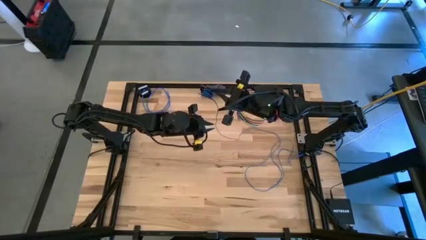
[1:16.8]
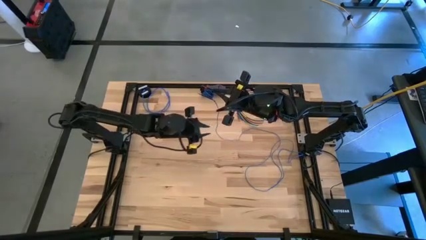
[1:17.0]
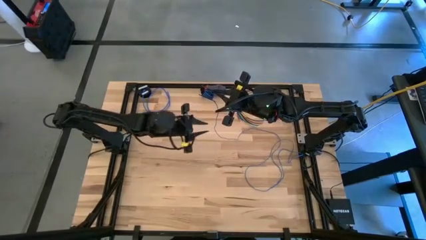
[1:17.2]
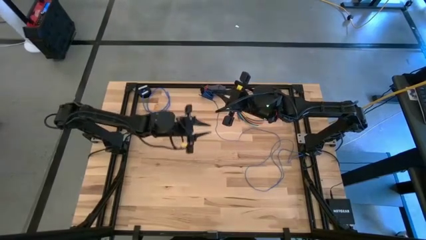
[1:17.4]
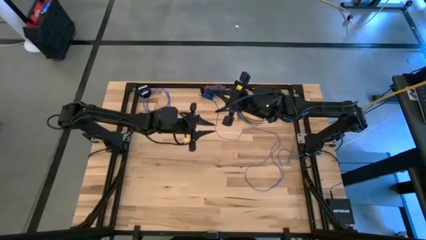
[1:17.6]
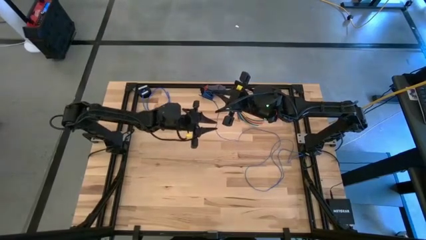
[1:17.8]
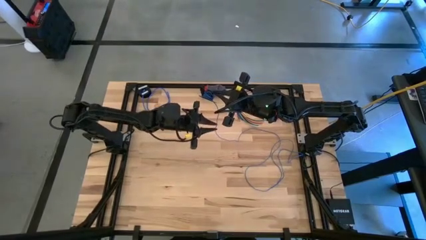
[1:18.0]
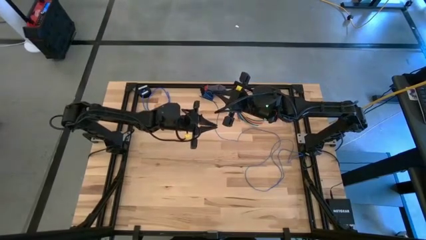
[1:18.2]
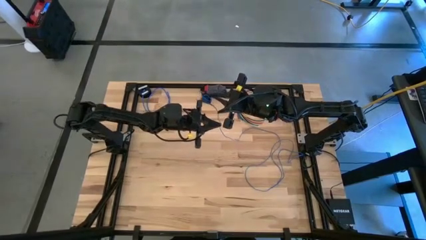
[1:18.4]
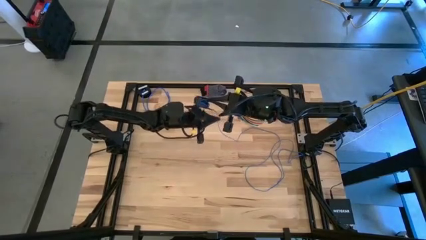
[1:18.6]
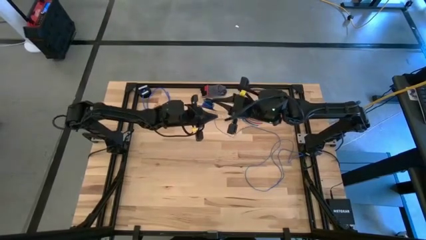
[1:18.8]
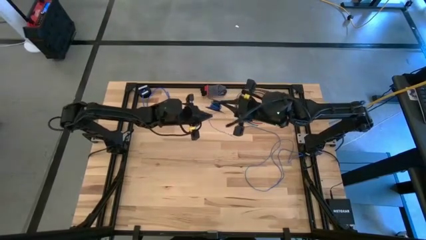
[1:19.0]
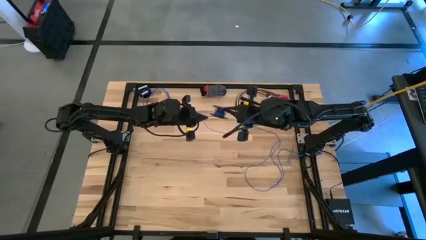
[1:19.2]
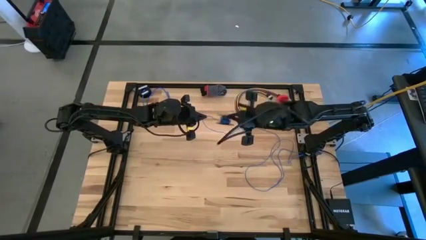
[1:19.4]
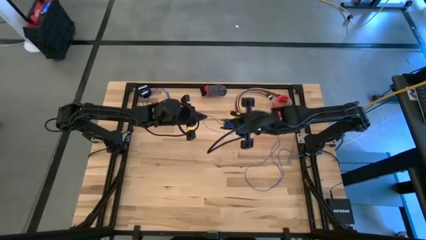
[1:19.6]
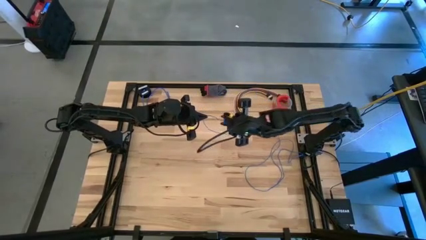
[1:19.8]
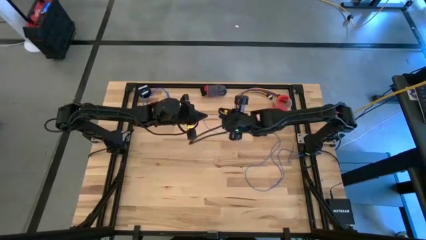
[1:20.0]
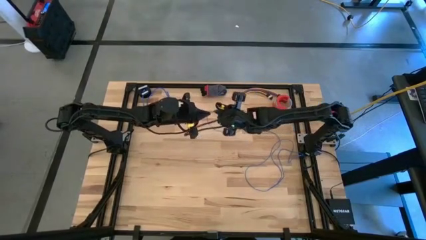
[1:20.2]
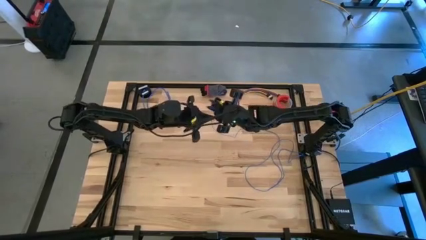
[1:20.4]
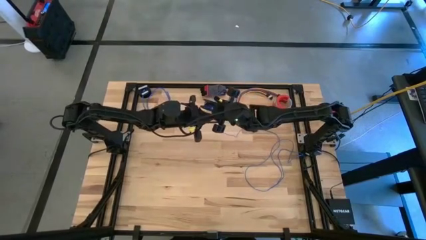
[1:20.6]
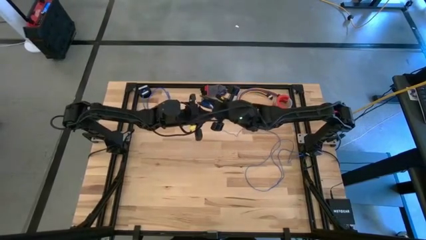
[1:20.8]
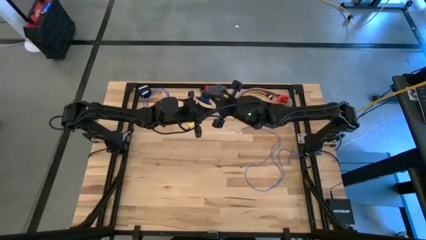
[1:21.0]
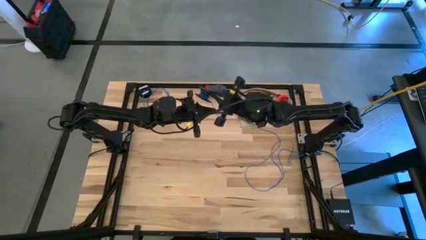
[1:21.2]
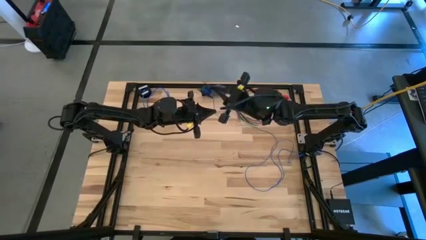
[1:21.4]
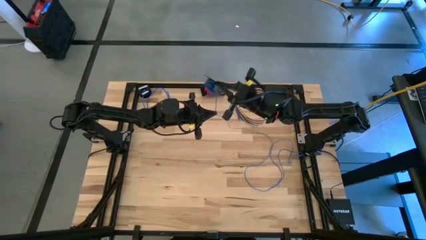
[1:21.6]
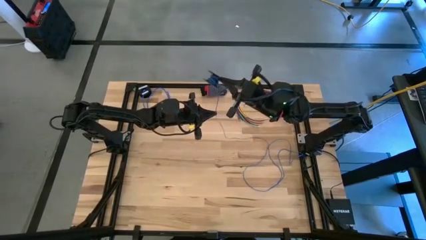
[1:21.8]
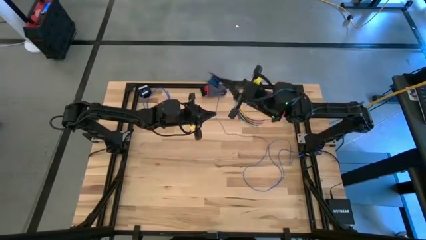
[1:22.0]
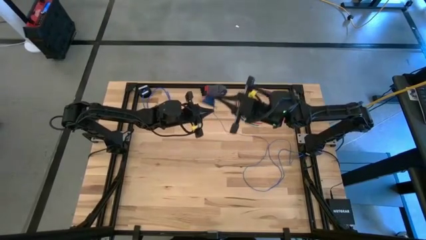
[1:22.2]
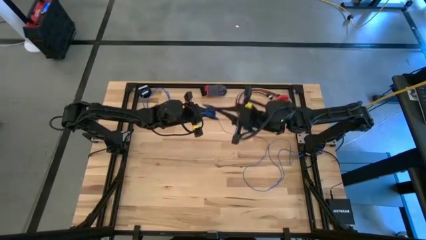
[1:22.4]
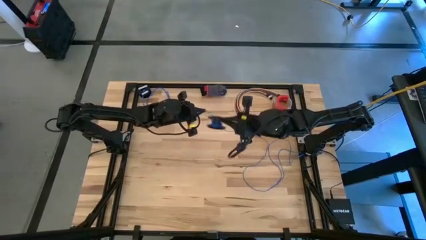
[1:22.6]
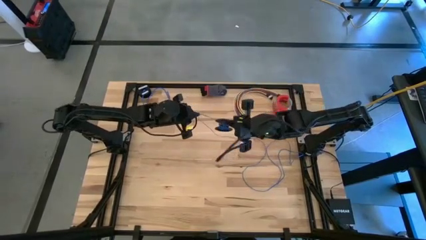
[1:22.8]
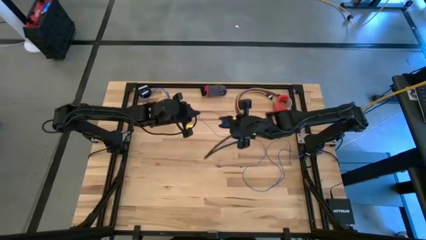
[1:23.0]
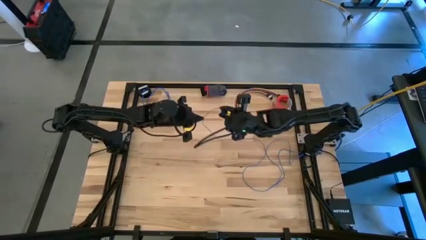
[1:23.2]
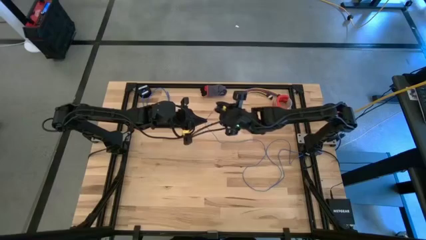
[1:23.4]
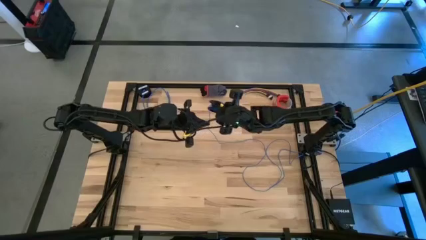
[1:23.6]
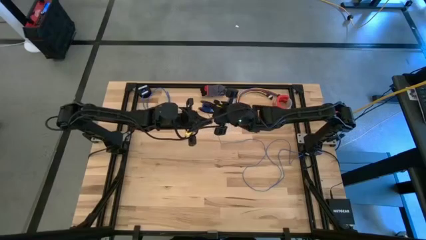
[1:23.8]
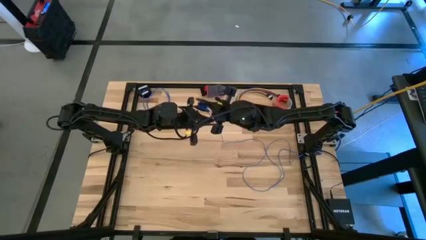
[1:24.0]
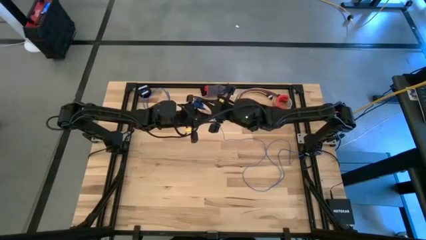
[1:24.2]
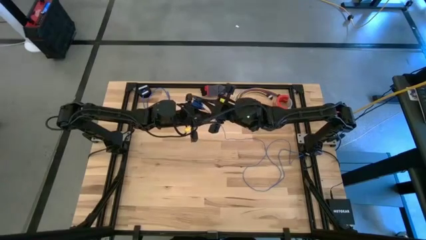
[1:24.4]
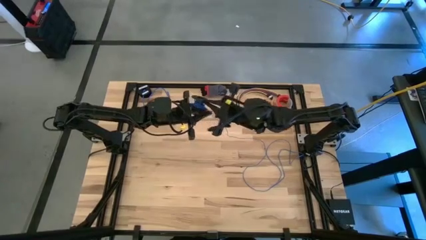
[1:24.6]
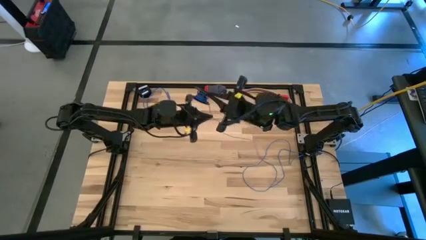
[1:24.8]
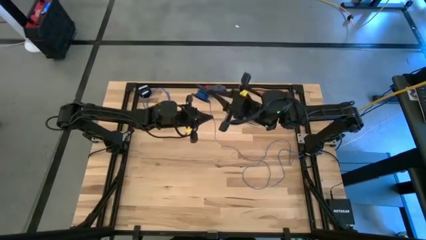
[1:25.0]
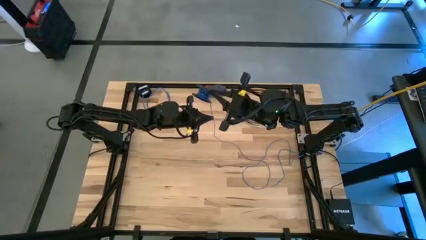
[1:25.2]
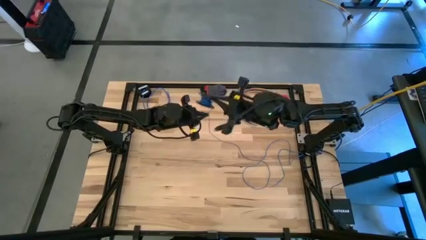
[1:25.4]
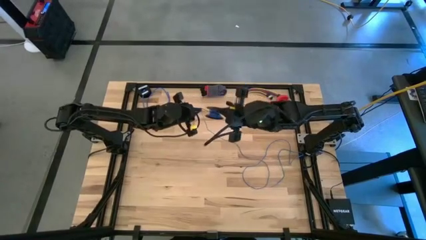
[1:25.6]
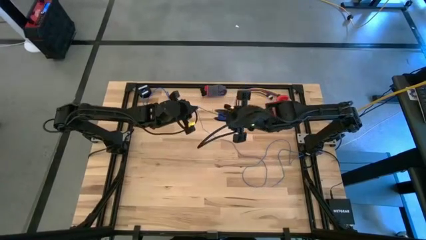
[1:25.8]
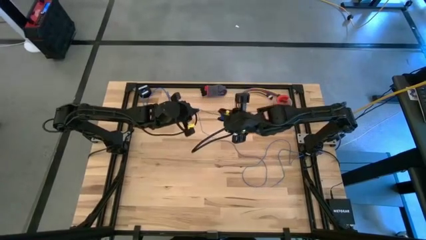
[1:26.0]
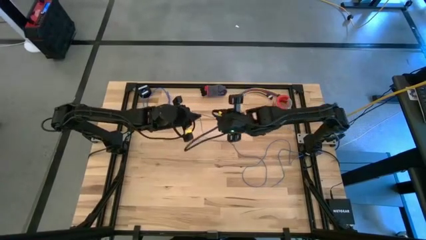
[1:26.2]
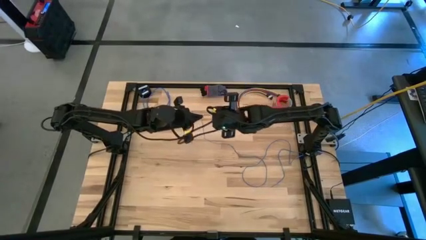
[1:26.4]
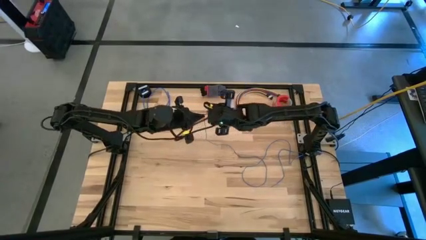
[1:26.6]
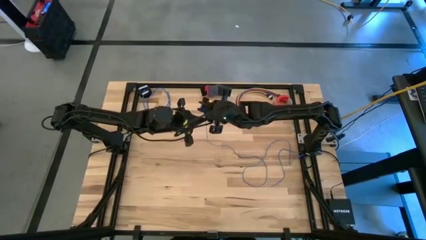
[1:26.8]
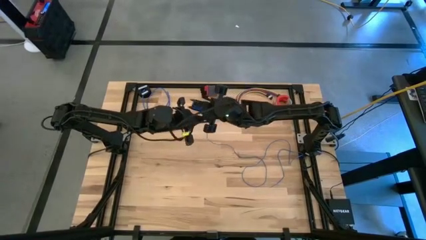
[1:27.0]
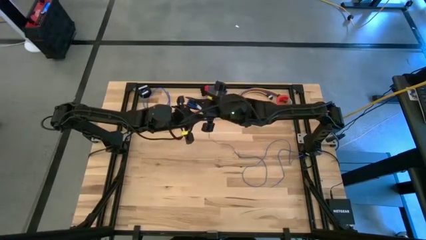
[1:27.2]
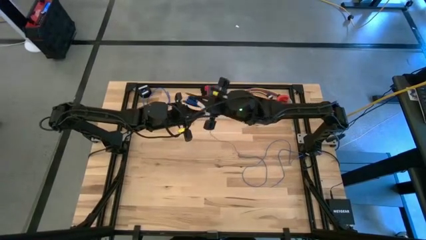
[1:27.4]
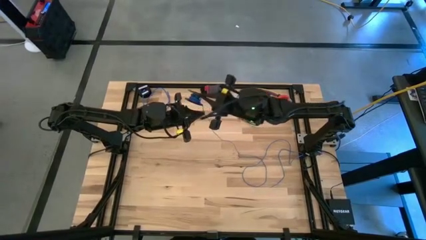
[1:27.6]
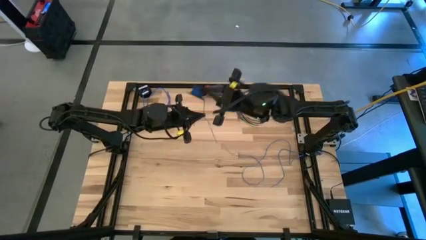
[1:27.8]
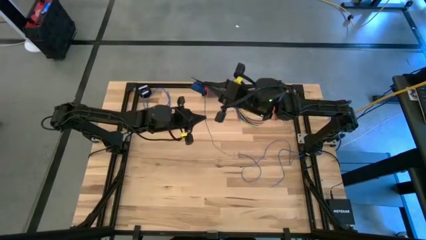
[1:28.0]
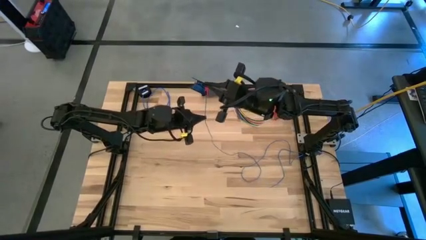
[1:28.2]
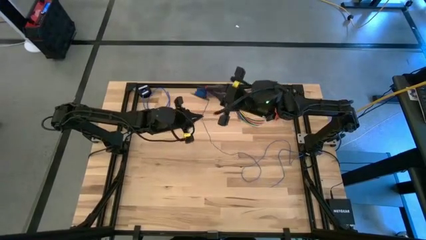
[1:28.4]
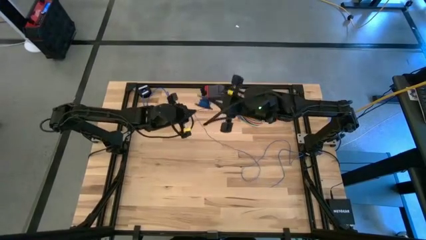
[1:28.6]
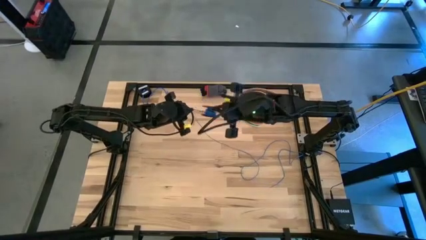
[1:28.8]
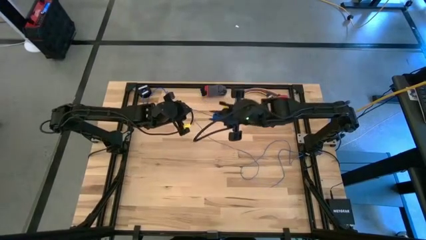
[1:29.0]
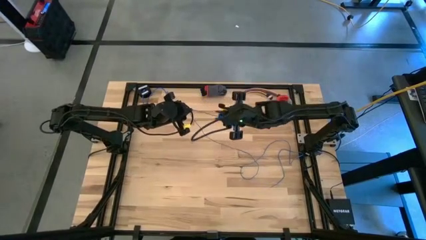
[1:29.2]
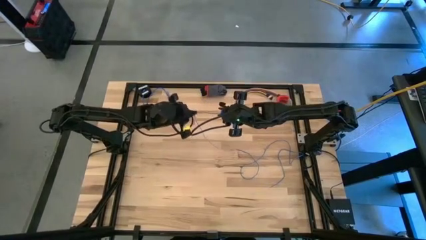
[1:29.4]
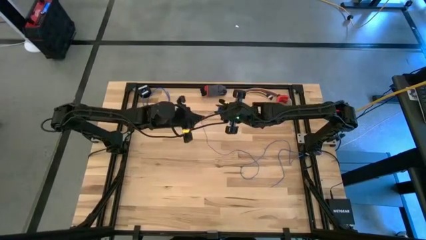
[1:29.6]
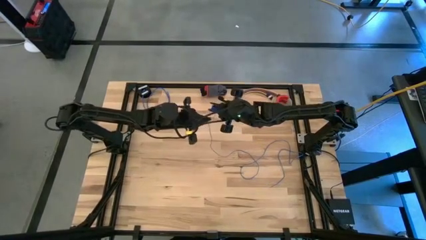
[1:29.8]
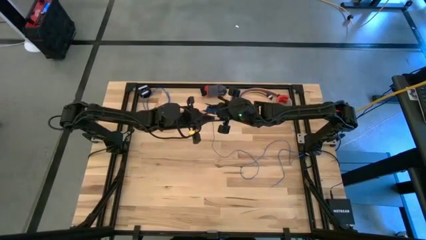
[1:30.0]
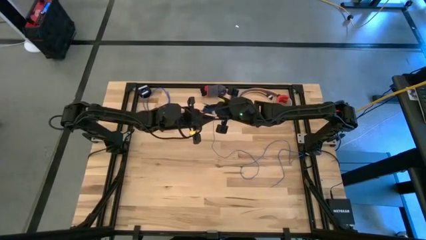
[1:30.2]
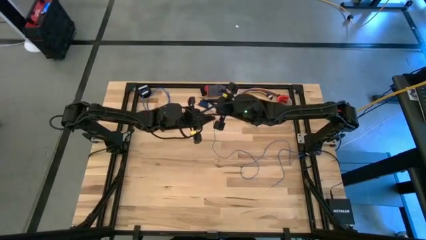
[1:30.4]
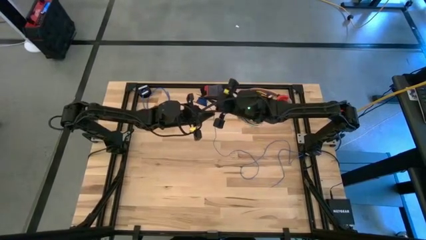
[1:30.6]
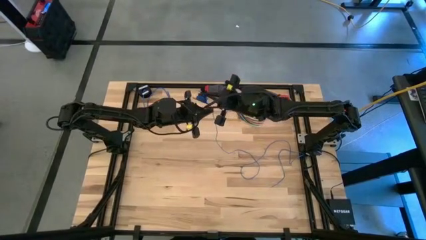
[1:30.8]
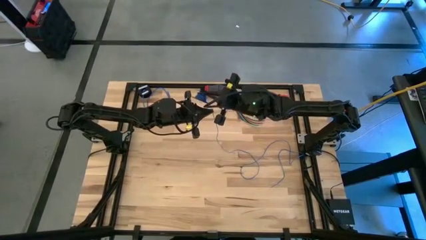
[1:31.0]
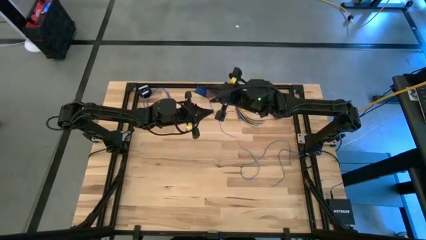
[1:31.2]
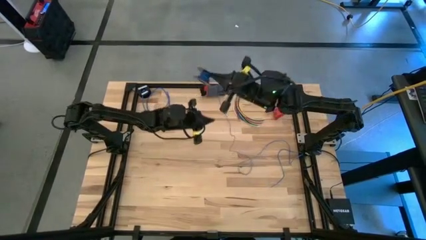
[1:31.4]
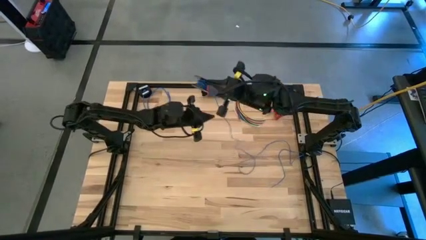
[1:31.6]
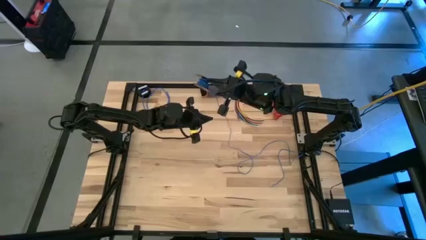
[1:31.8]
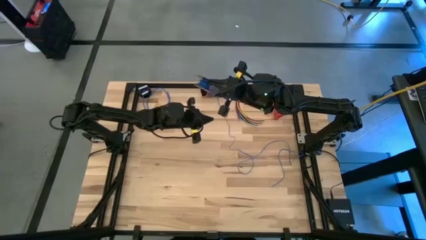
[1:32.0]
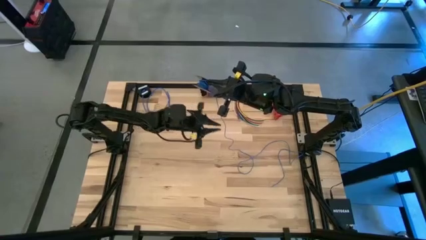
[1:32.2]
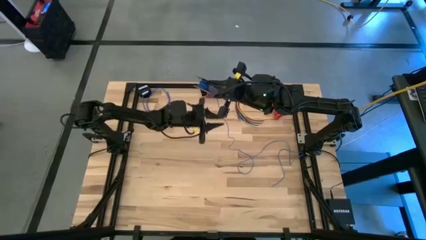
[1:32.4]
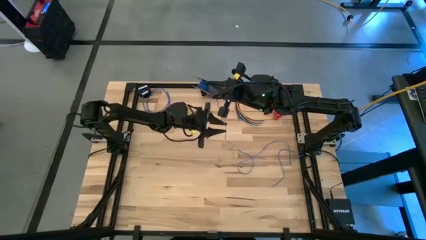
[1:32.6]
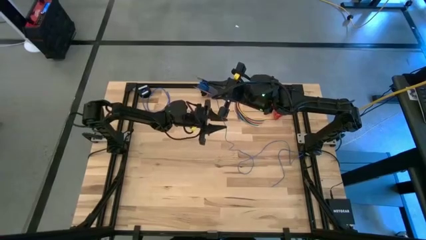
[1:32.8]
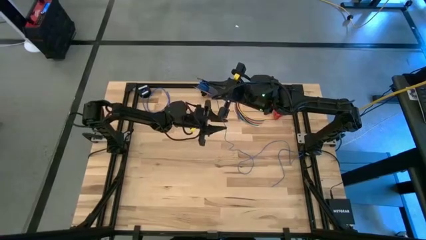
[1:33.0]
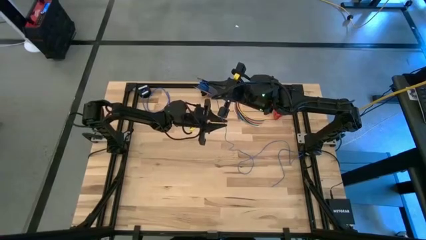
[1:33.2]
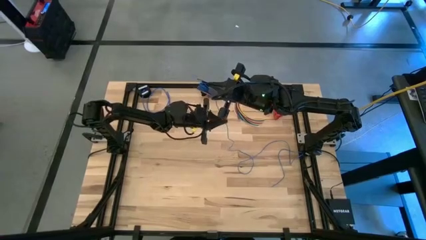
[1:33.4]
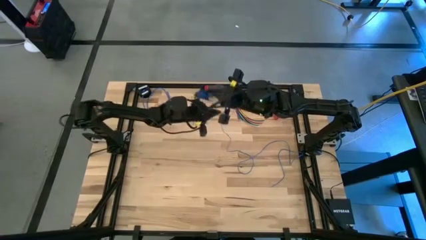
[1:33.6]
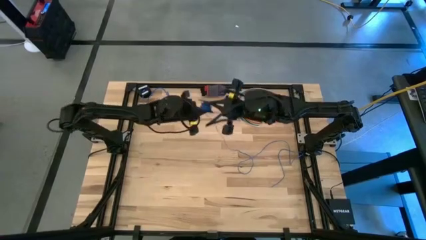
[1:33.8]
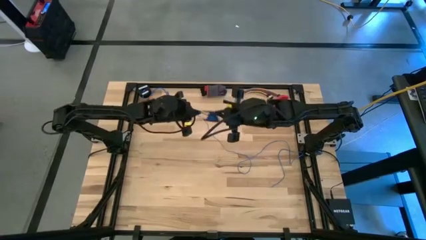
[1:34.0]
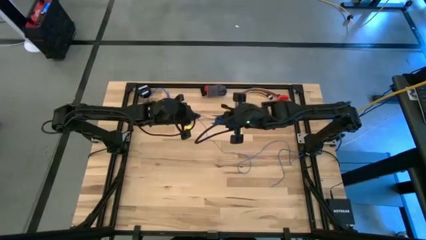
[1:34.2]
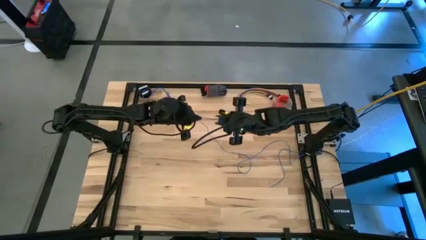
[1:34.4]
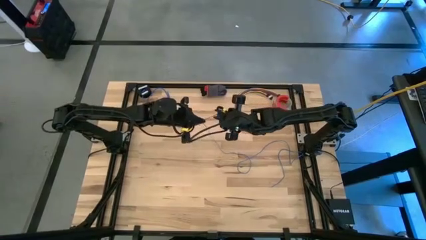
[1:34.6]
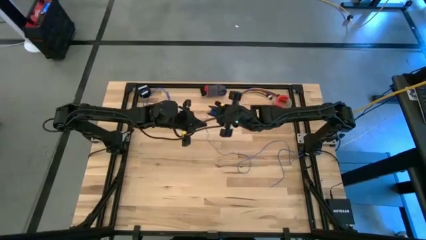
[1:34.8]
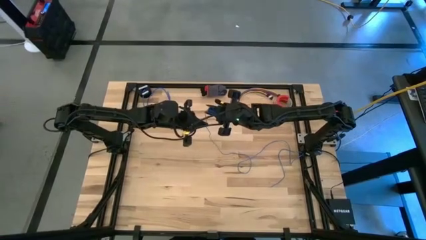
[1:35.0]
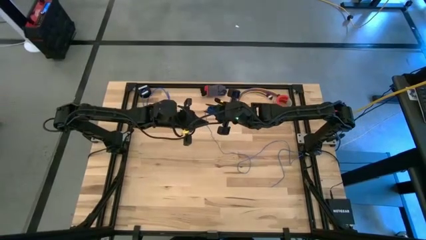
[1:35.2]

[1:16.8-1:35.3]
Task: Coil cords
Coil the blue wire on the black spool
